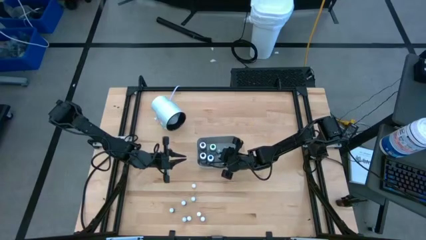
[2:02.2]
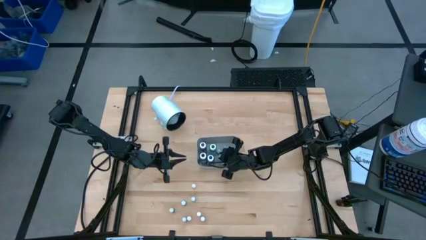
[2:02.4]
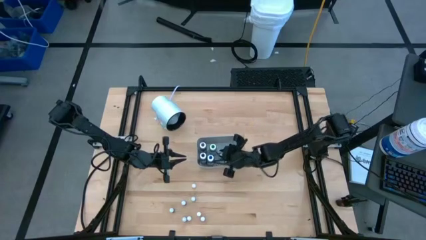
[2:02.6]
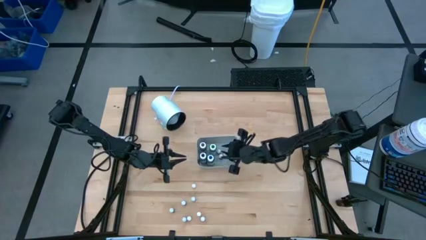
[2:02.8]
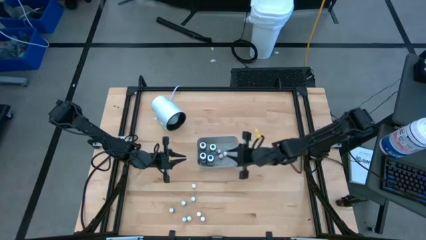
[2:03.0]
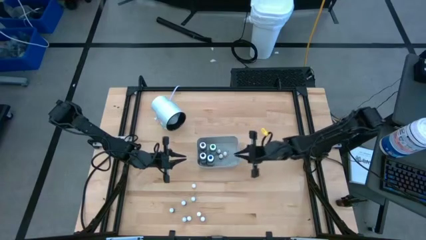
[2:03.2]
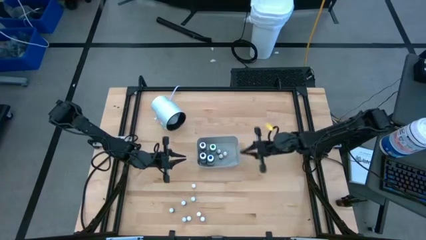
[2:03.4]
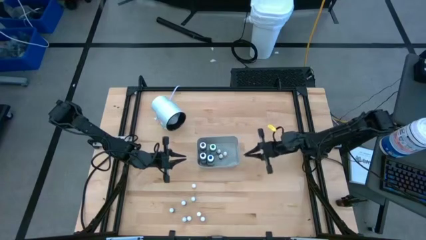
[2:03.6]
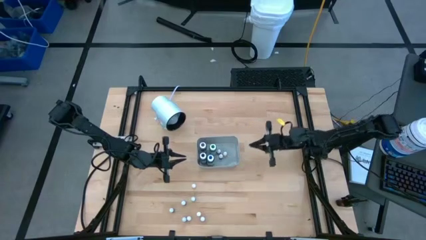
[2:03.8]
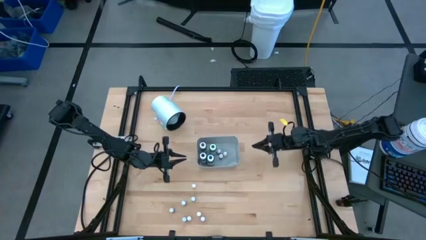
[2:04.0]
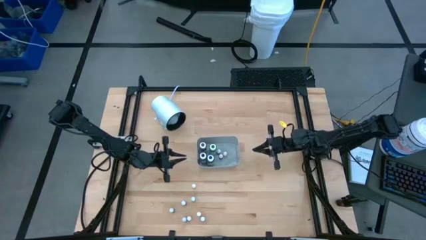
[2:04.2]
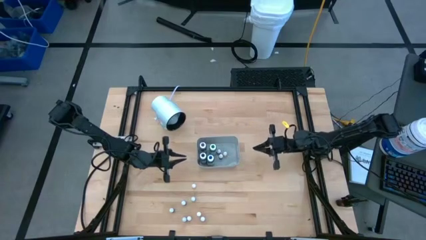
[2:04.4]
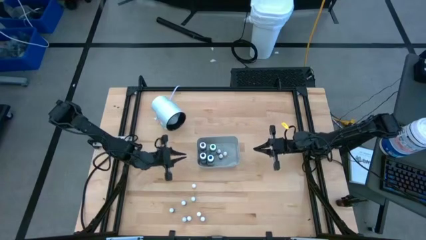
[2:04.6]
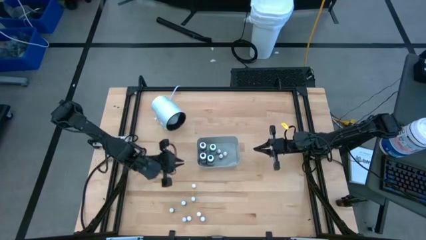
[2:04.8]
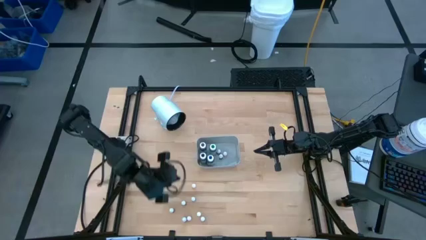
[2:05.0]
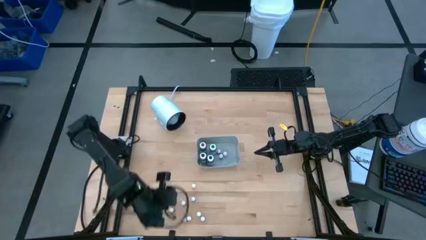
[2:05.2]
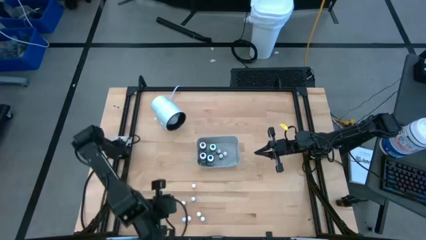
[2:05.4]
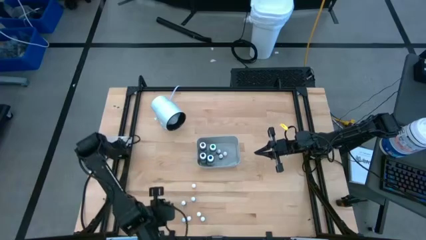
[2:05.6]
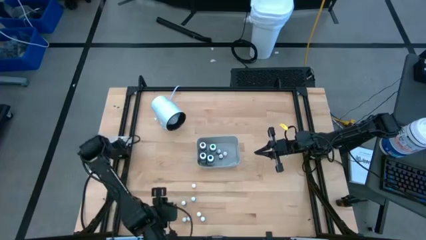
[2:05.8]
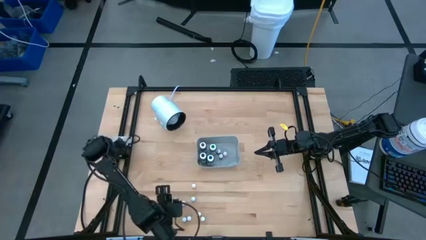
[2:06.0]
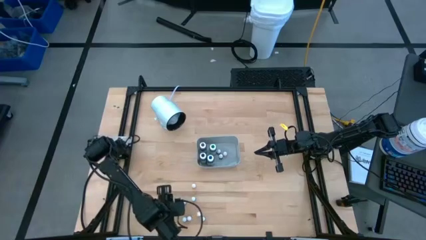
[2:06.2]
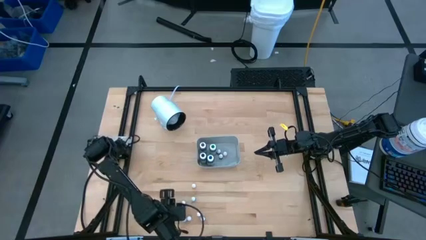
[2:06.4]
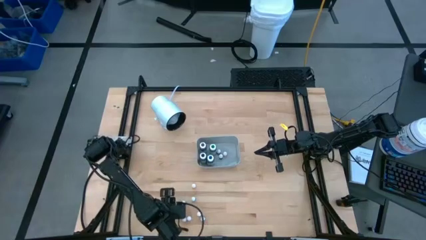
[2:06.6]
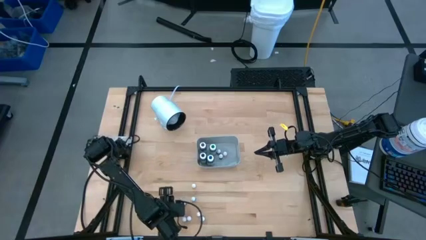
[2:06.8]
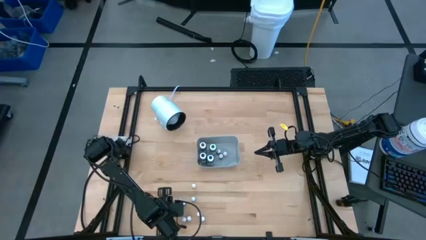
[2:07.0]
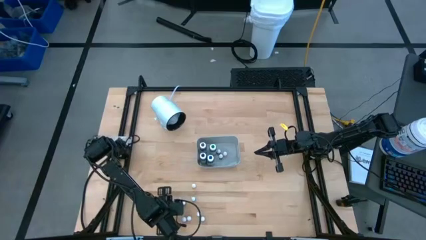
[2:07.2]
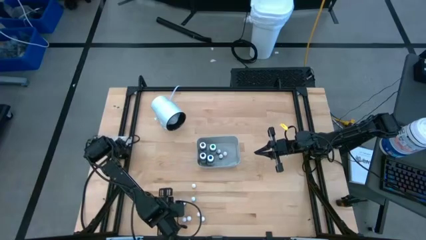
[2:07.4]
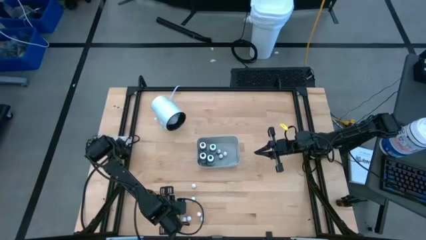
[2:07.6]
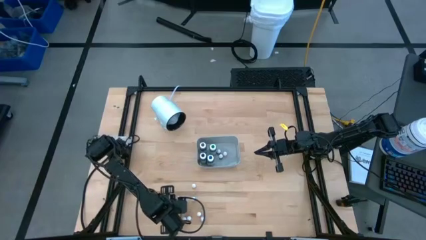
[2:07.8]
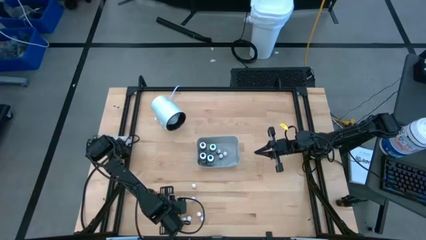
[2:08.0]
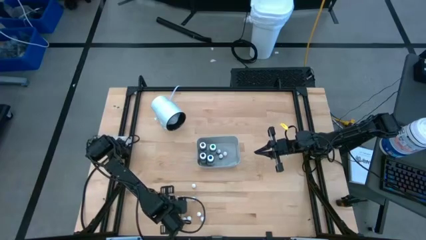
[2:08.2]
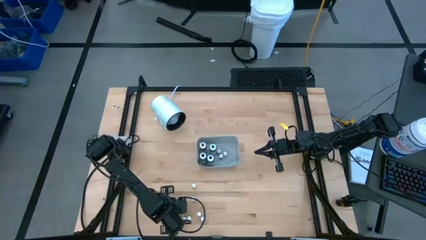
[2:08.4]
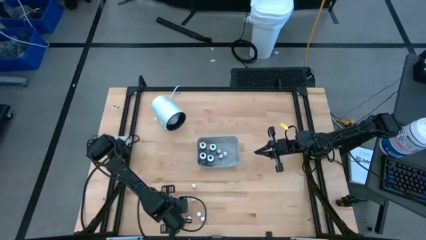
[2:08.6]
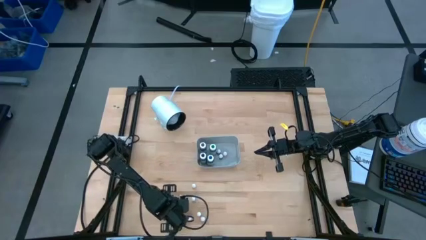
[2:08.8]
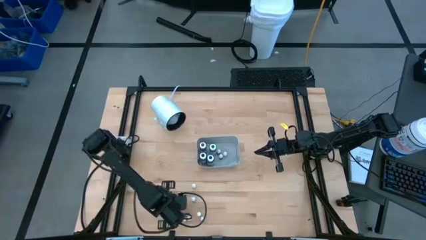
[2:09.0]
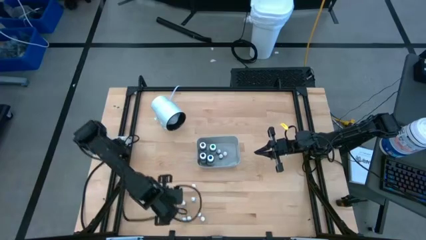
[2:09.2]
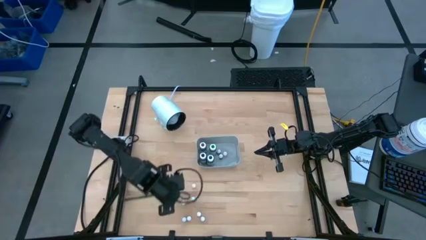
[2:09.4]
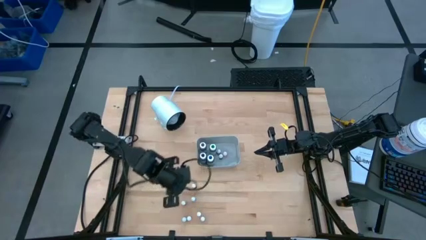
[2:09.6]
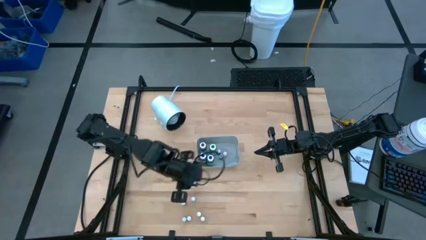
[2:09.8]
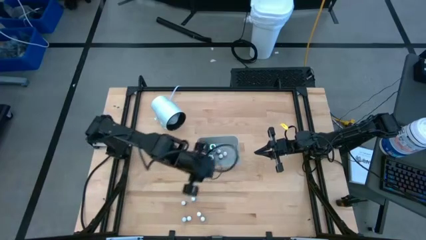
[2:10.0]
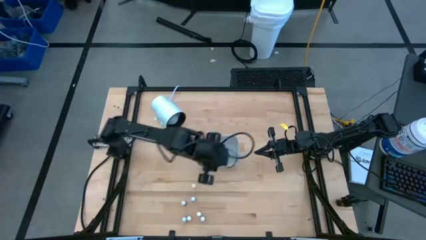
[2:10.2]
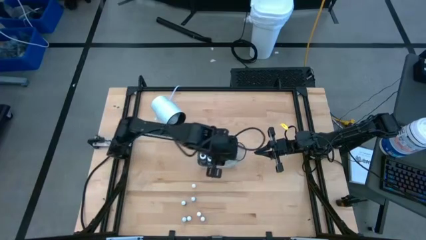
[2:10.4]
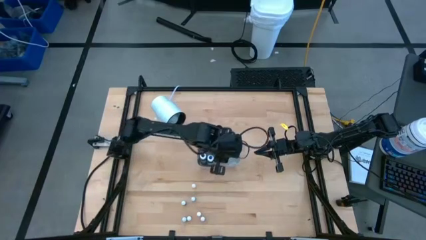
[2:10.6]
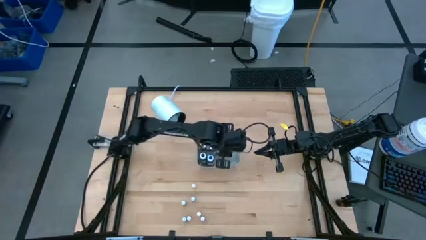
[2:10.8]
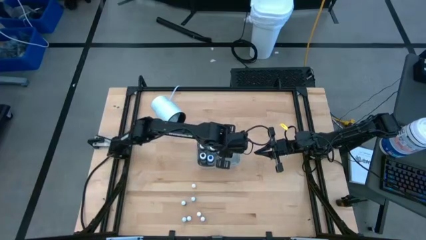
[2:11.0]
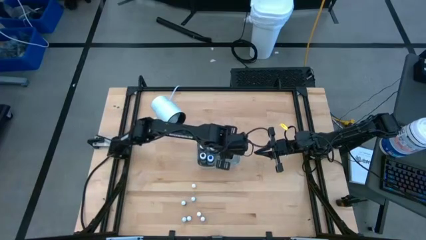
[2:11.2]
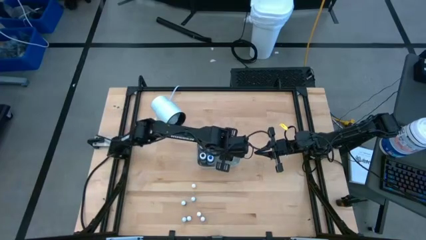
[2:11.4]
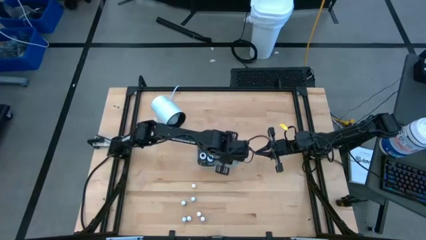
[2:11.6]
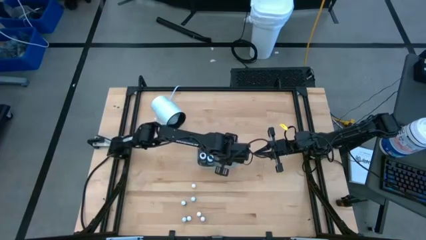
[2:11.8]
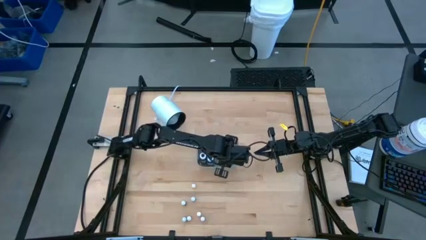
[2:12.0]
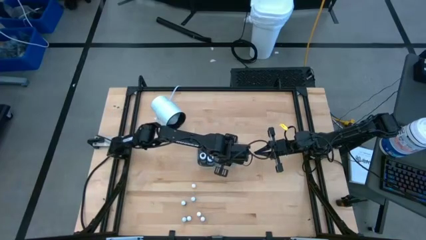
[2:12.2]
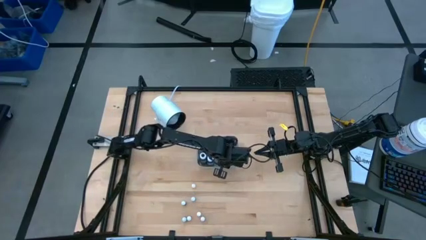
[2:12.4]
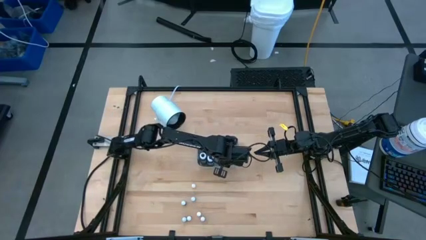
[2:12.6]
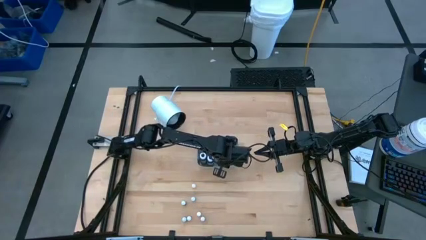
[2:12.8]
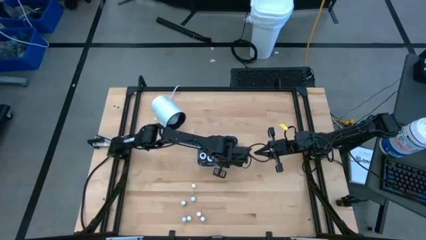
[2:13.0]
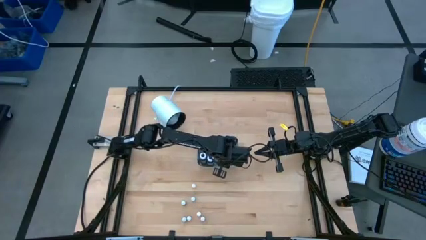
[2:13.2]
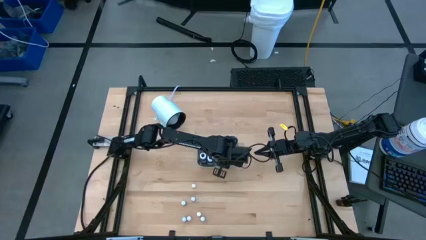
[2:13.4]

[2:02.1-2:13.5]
Task: Pick & Place food coloring
Put the small blue food coloring bottle into the gray bin
